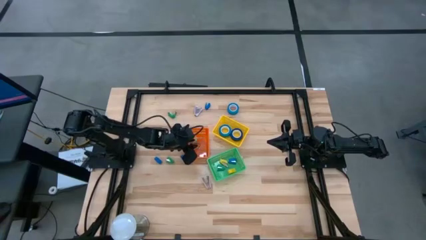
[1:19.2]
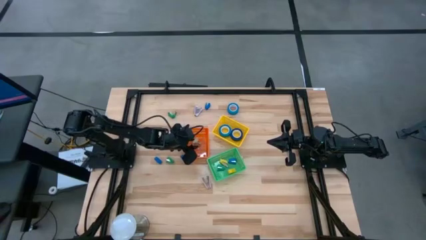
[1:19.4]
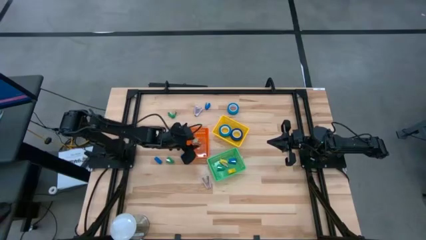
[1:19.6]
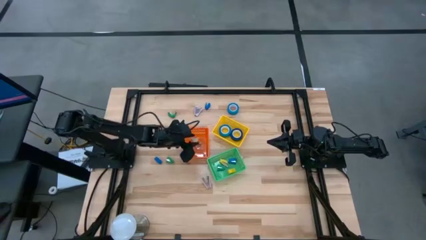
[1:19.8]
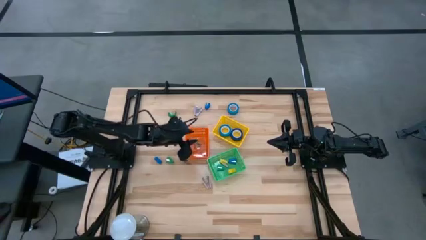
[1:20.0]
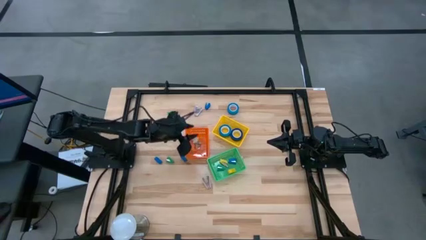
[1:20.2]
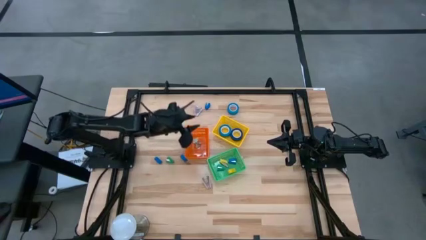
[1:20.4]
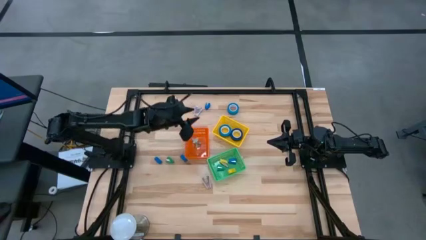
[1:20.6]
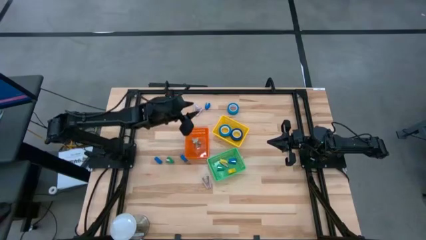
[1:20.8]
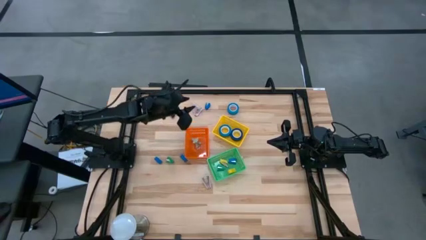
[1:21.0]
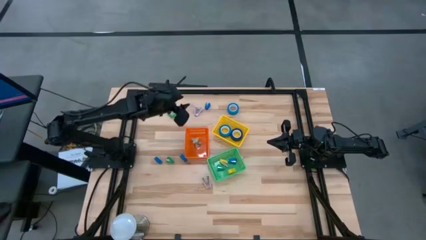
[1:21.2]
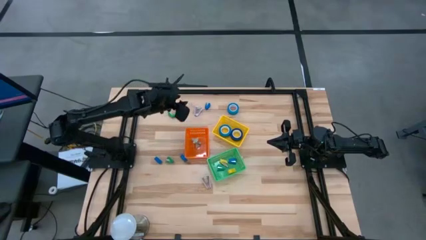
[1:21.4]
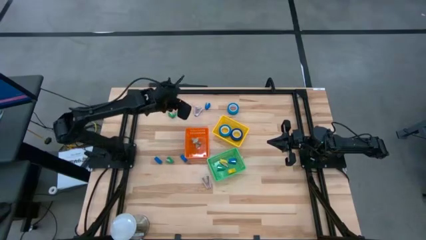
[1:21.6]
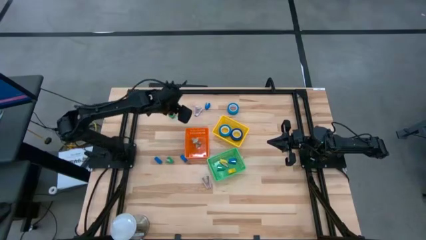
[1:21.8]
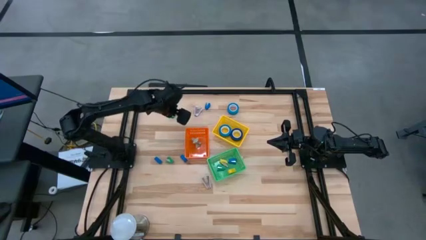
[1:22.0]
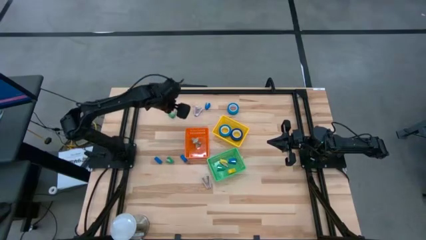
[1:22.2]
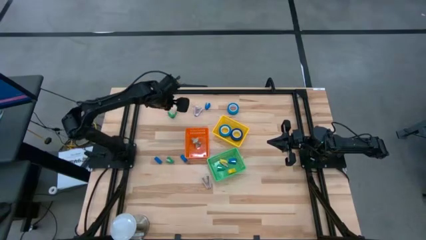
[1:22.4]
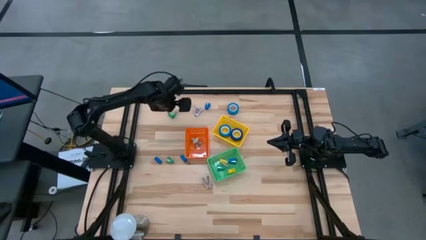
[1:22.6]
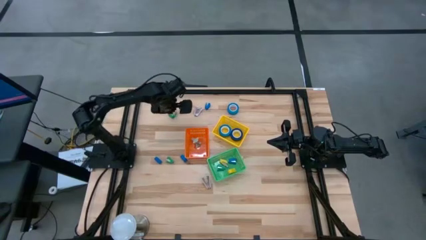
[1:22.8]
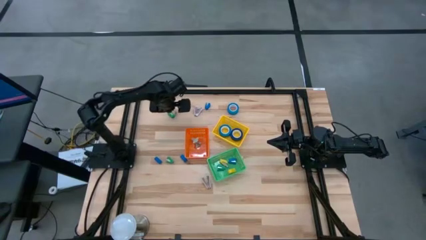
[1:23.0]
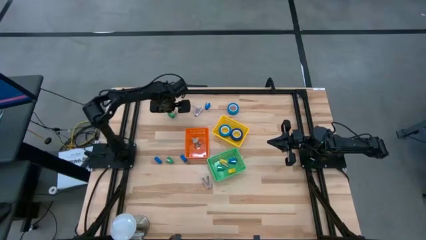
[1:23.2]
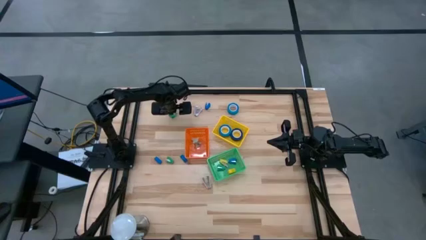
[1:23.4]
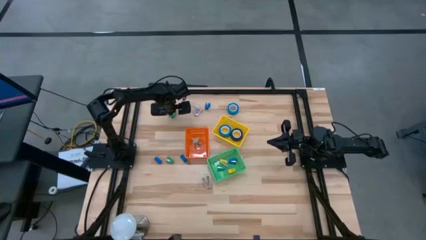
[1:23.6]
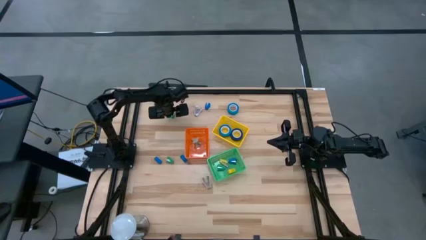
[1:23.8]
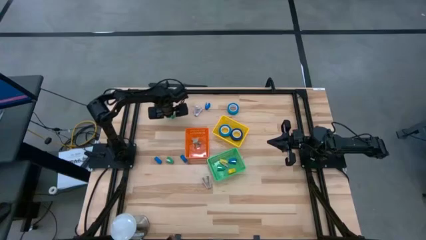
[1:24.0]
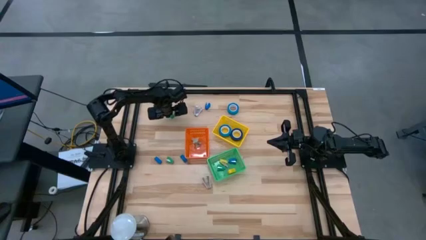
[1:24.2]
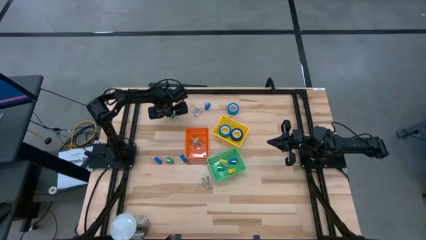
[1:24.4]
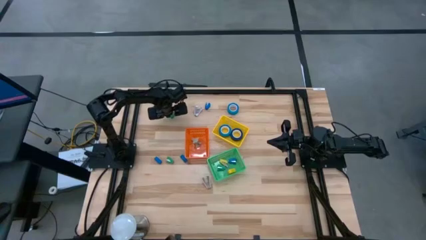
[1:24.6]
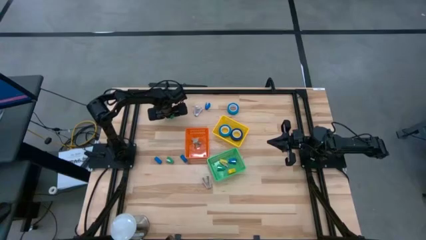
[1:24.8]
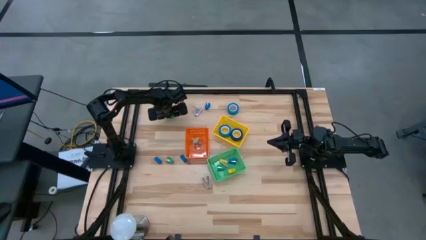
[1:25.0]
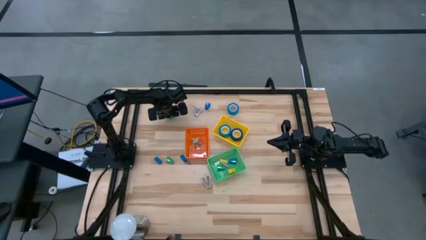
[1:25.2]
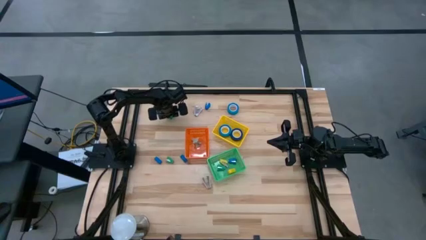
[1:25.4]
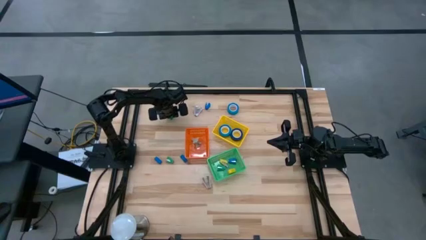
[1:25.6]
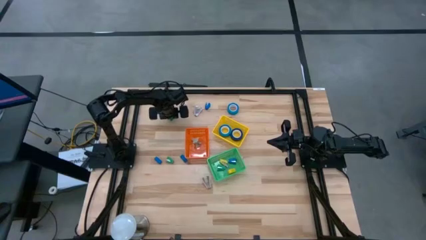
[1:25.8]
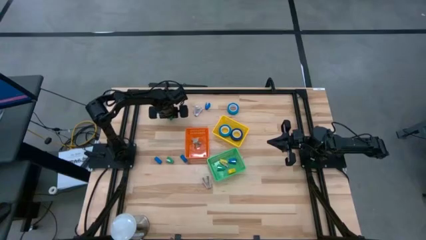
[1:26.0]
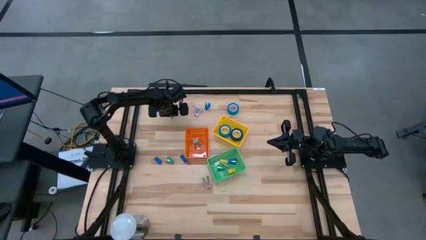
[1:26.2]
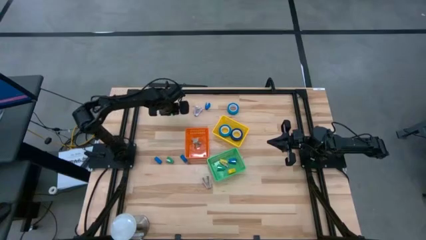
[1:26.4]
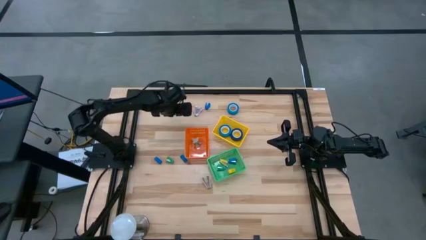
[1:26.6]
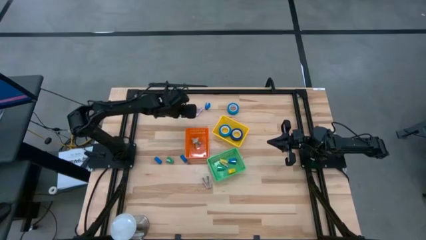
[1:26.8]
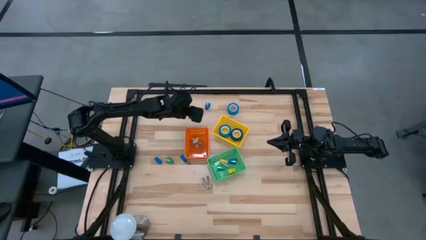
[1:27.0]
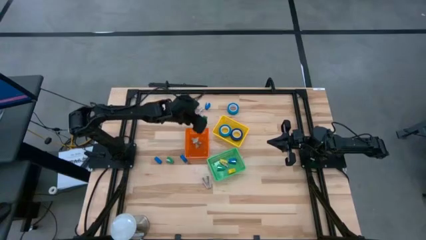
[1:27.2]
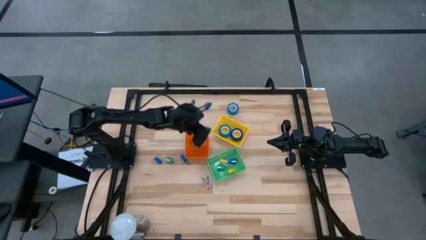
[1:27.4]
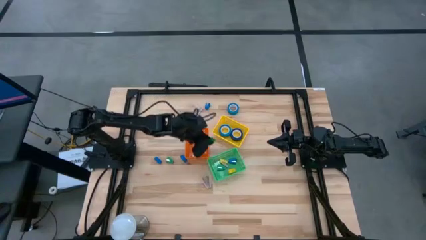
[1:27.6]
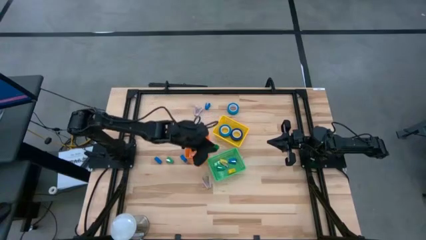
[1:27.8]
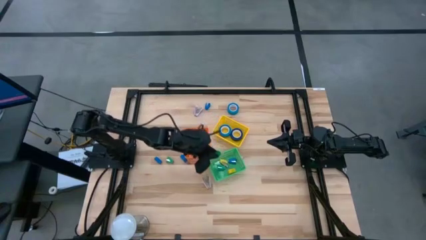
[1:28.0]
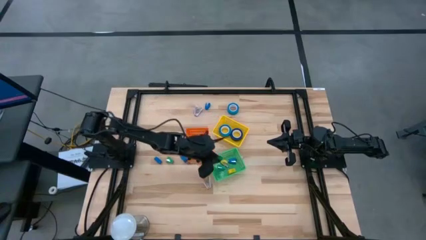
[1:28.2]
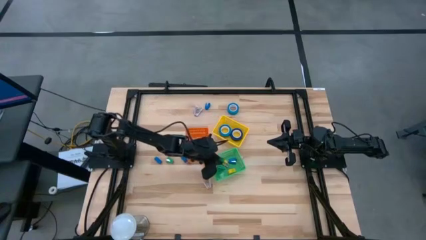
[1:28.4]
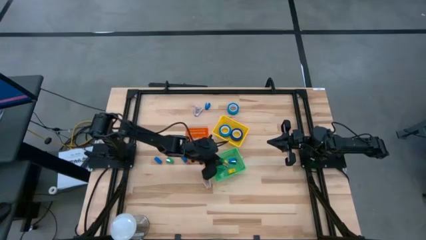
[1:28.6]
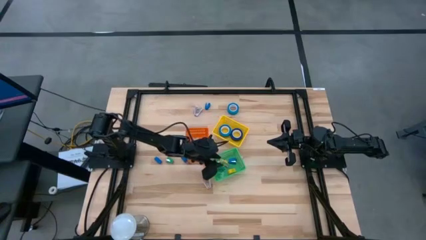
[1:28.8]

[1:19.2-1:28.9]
Task: Pick and place Stapler, Stapler remover, tape
Put the green stapler into the green bin

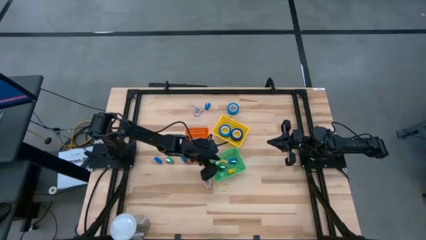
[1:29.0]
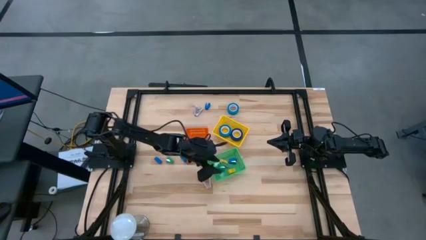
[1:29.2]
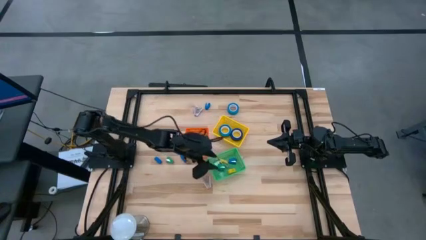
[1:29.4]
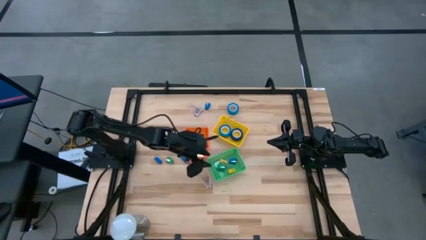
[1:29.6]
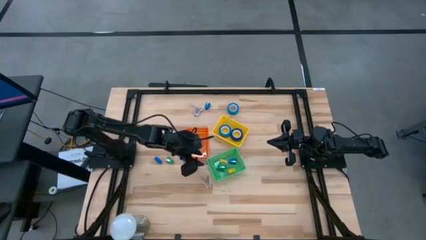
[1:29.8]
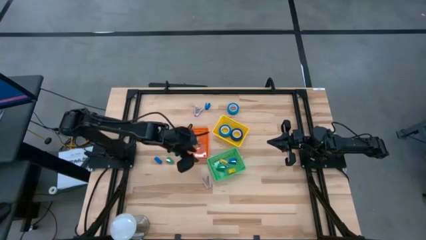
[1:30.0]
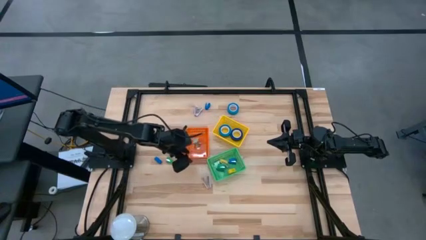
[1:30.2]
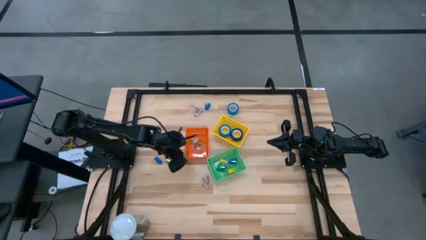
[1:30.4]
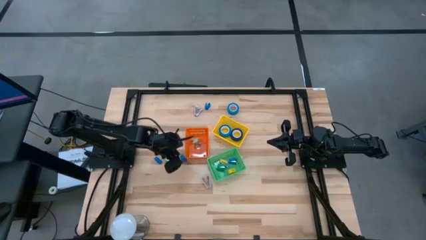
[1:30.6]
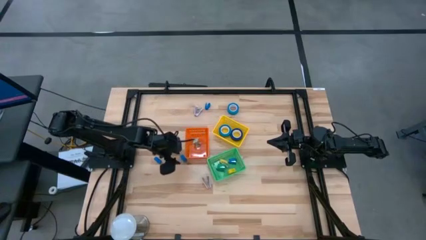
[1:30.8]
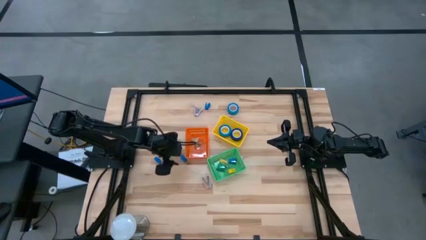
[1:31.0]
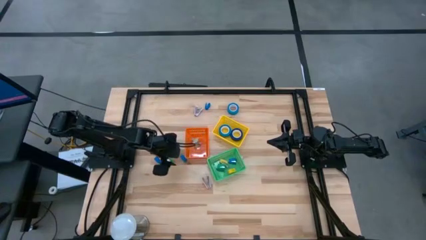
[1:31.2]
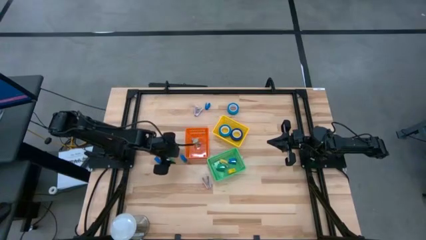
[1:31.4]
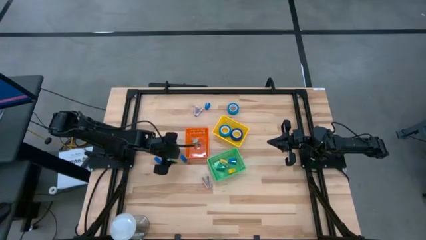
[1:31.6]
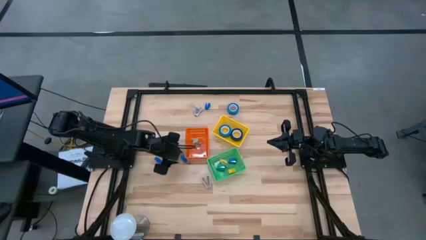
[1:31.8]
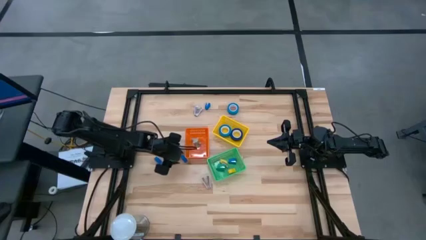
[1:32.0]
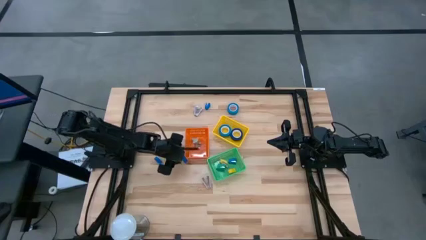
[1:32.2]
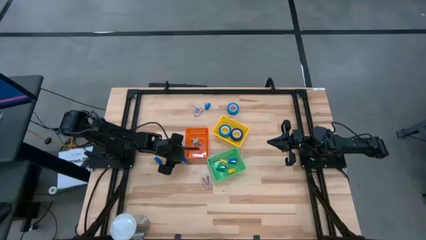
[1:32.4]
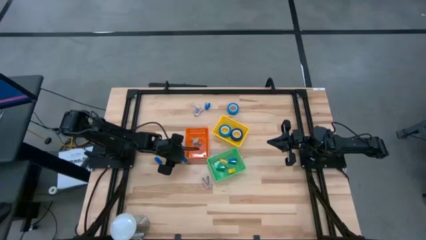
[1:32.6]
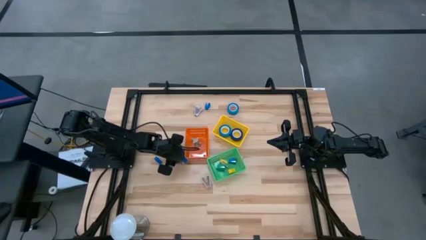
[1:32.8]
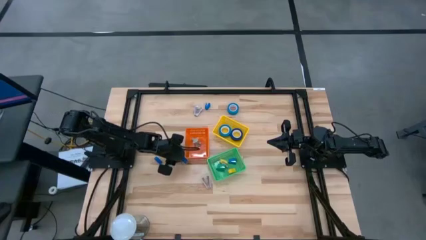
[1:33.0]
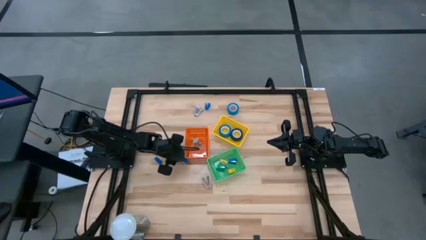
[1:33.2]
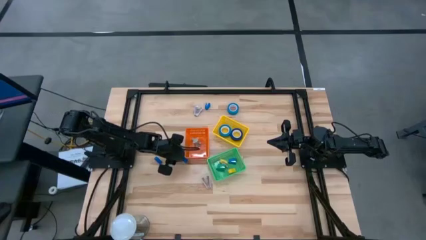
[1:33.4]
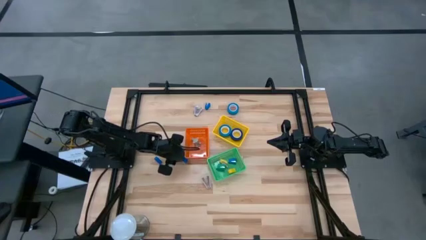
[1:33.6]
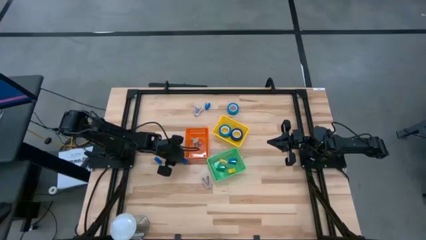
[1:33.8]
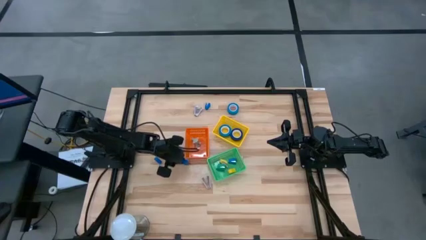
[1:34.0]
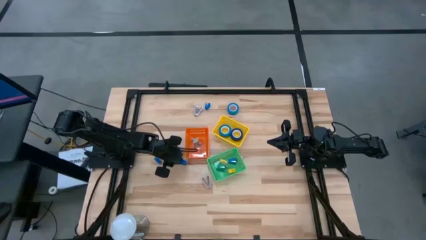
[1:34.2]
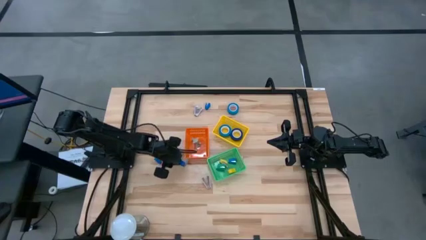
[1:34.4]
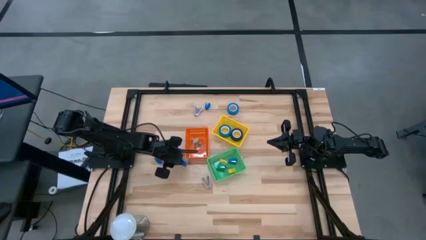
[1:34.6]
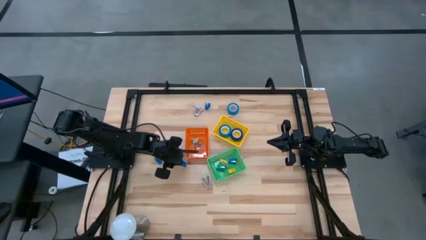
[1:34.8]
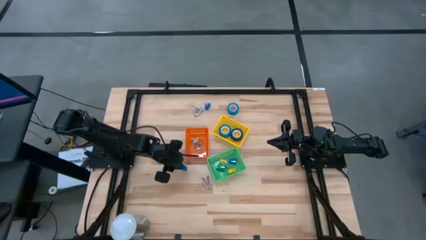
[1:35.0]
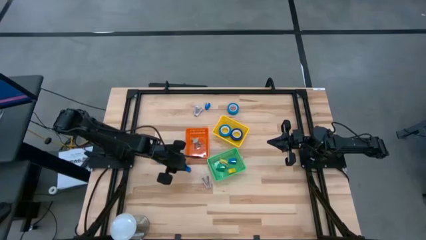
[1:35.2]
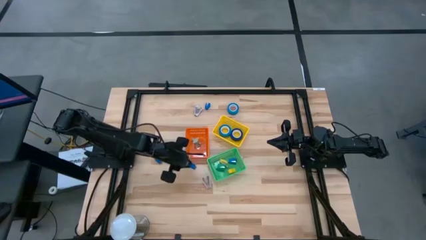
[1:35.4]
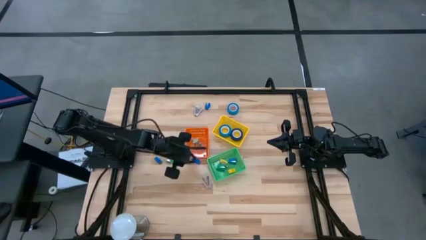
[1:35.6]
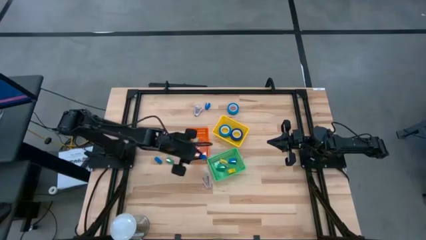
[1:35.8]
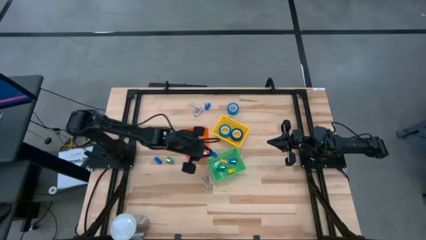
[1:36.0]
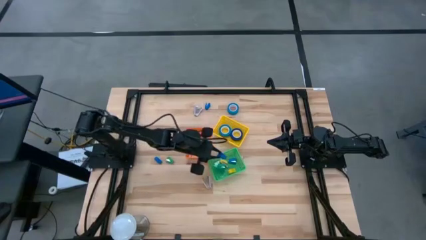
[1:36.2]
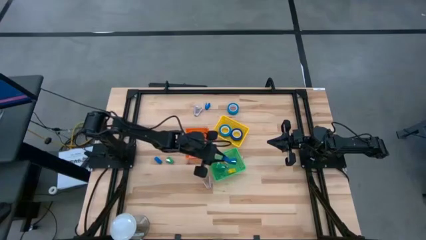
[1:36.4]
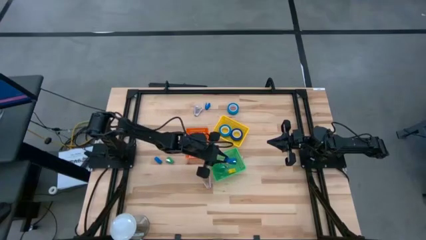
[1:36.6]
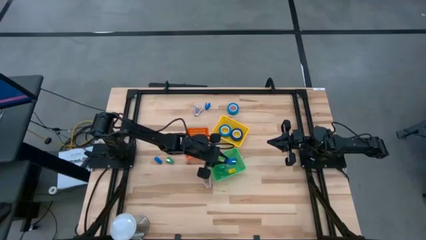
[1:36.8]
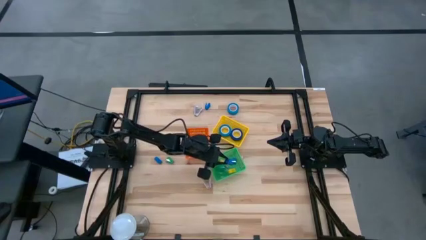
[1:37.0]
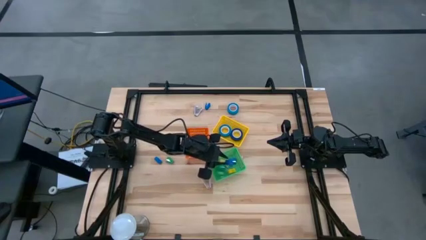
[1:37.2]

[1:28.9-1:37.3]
Put the blue stapler into the green bin
